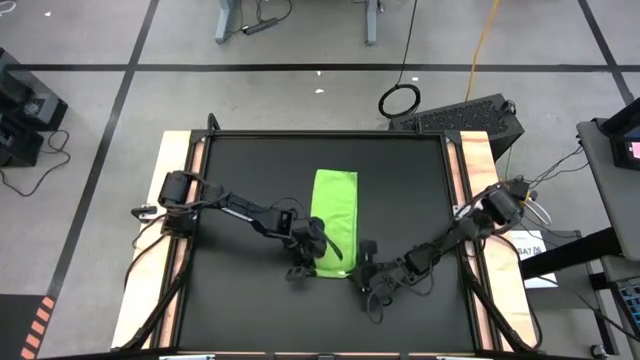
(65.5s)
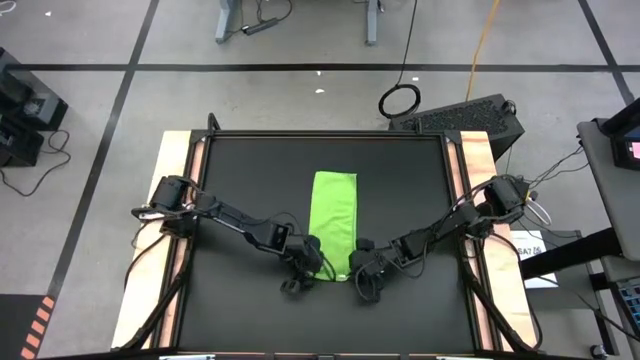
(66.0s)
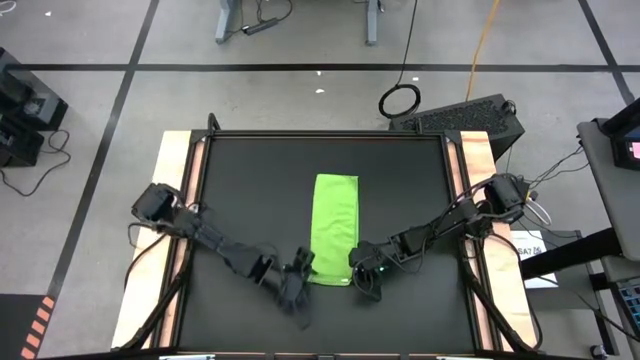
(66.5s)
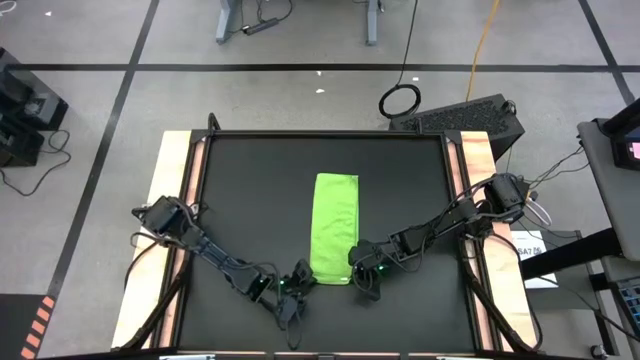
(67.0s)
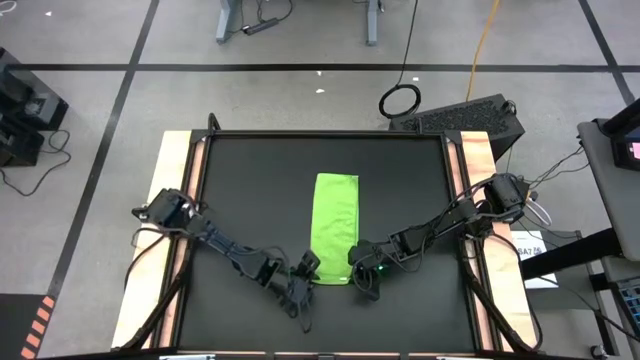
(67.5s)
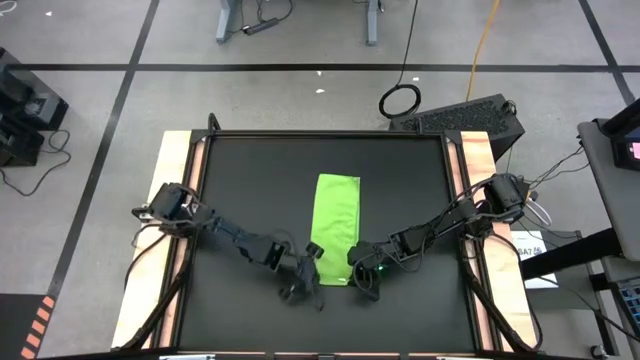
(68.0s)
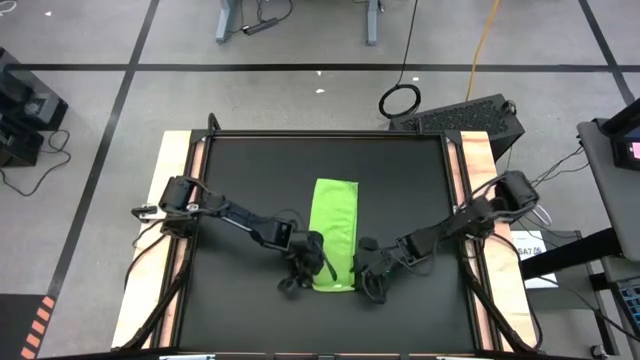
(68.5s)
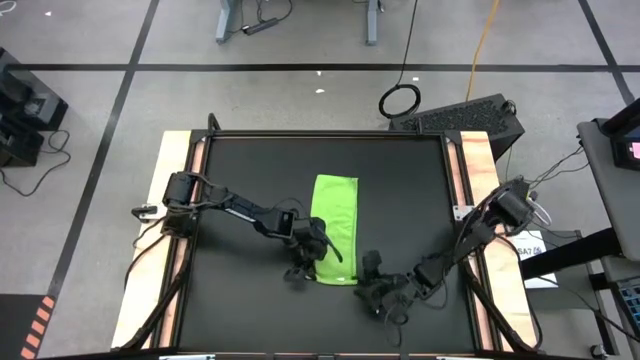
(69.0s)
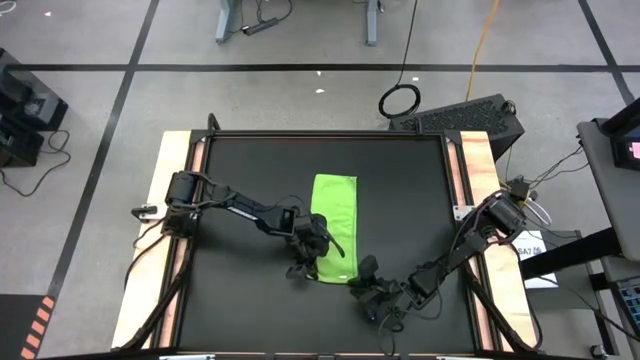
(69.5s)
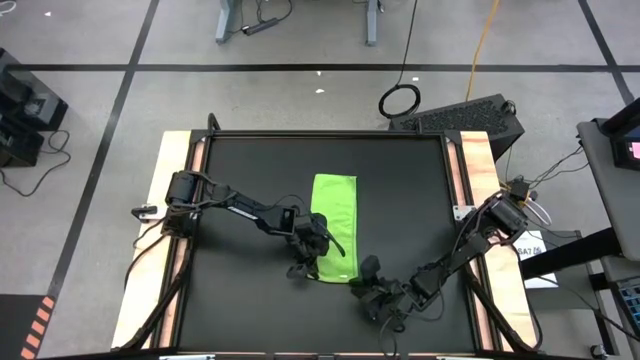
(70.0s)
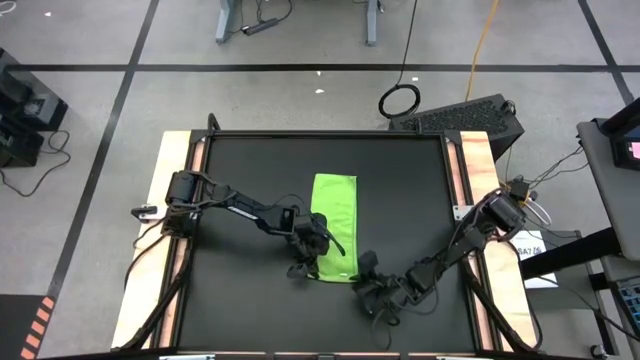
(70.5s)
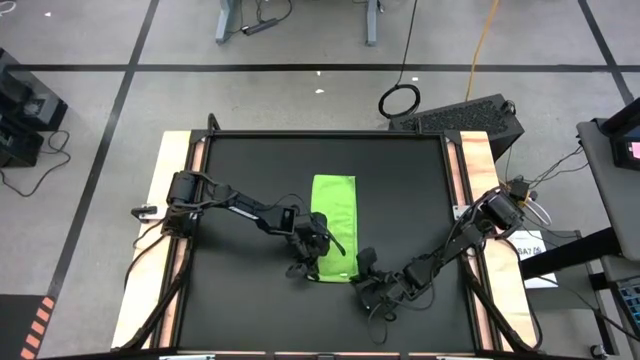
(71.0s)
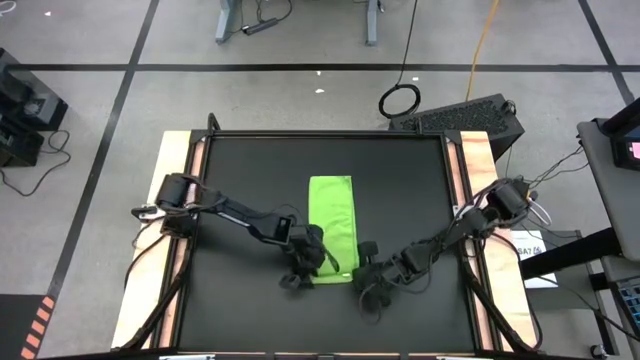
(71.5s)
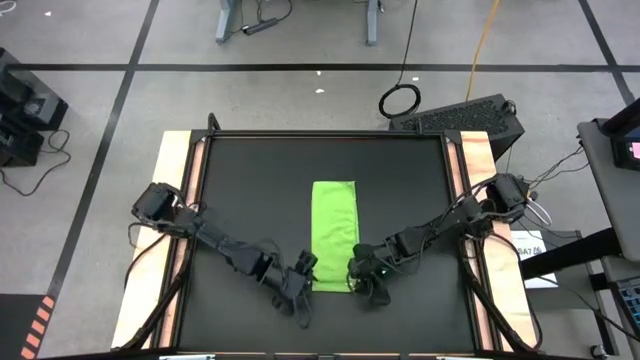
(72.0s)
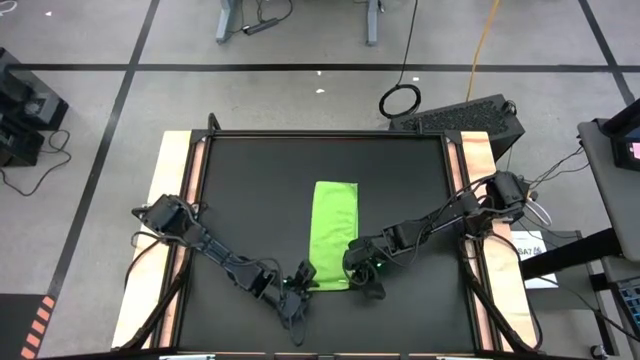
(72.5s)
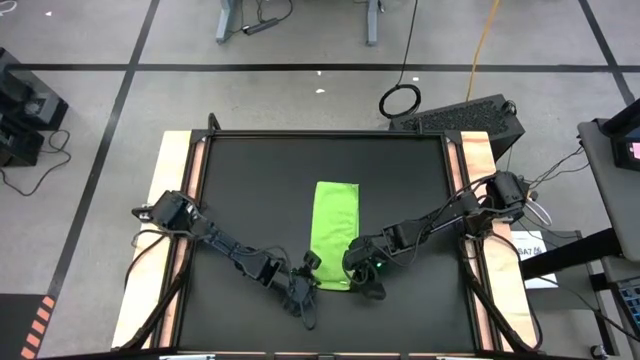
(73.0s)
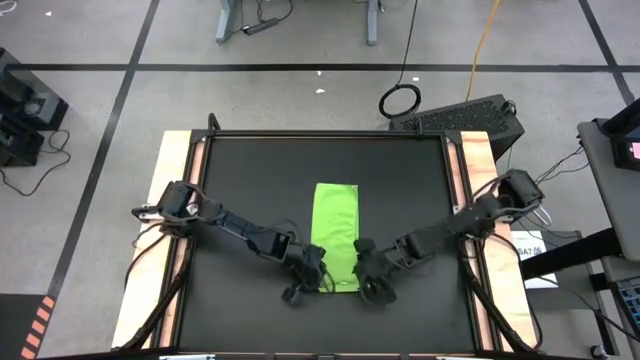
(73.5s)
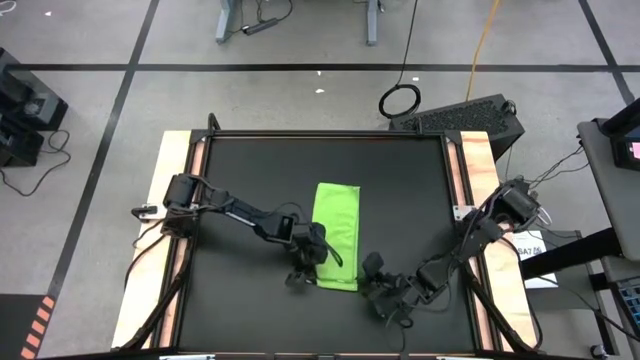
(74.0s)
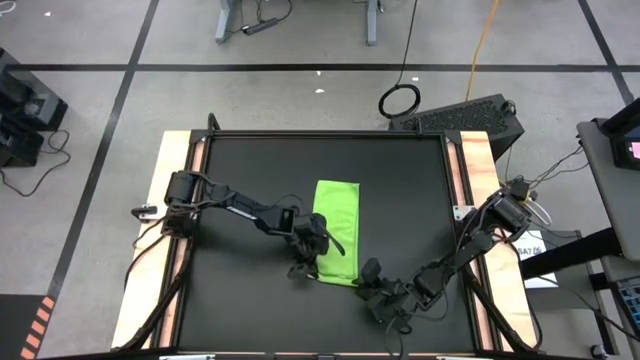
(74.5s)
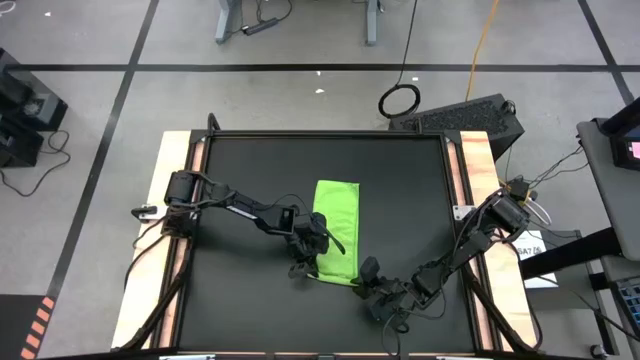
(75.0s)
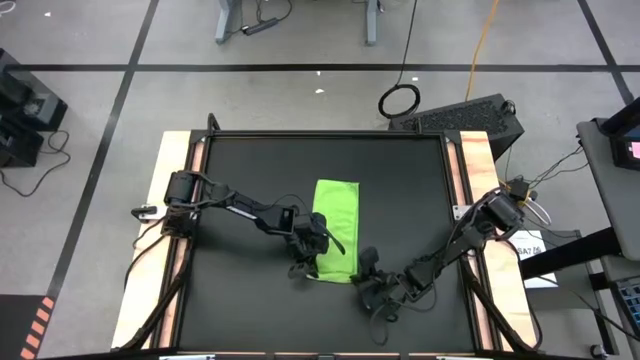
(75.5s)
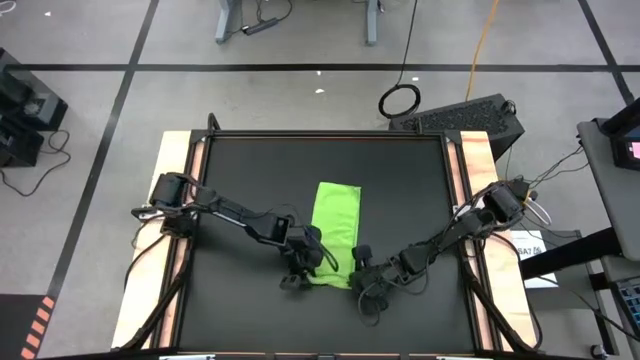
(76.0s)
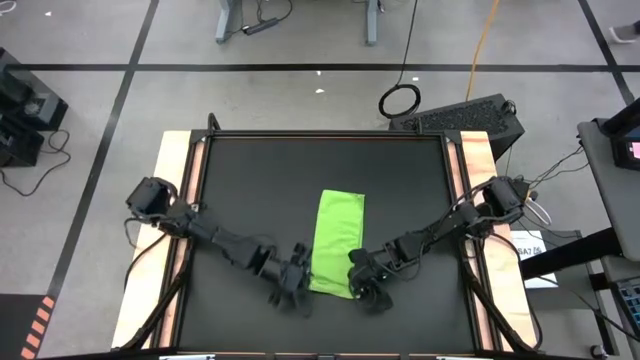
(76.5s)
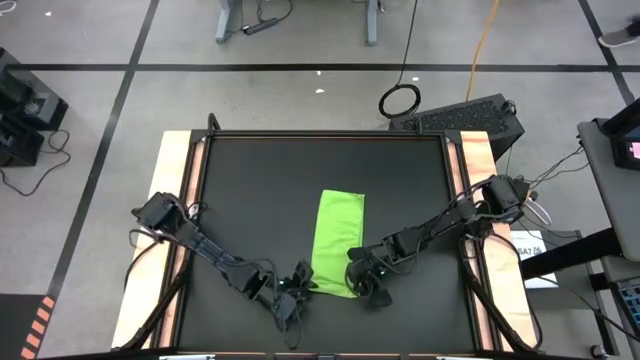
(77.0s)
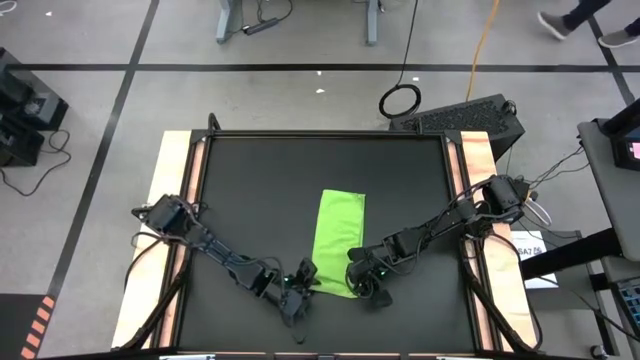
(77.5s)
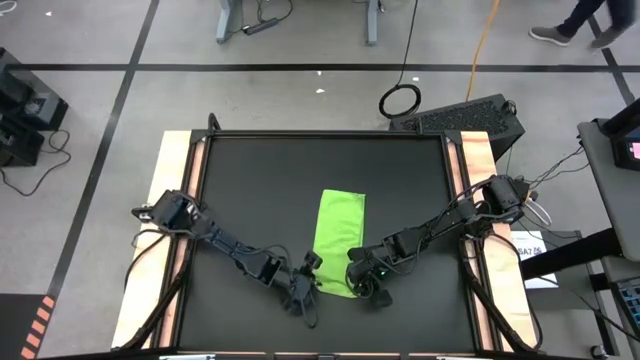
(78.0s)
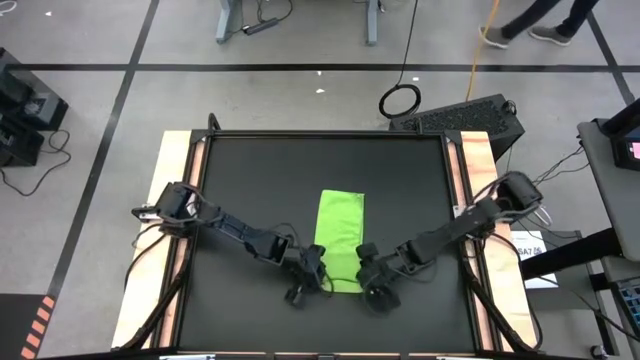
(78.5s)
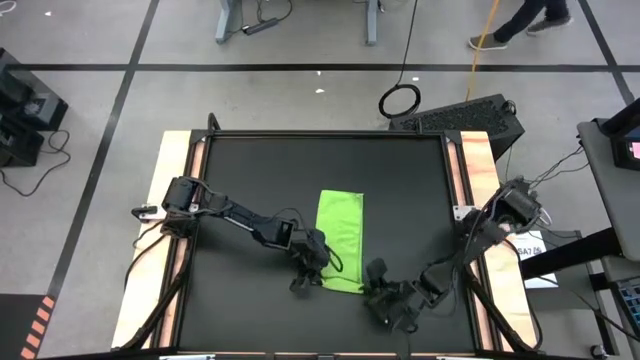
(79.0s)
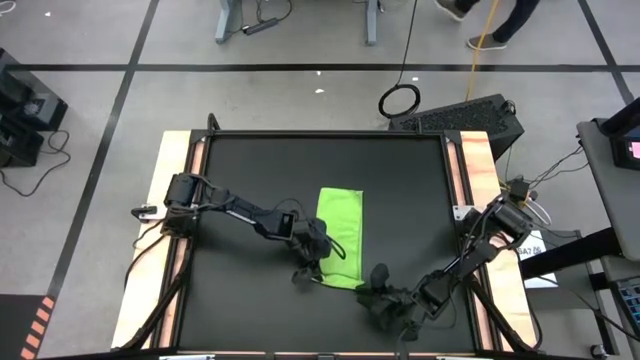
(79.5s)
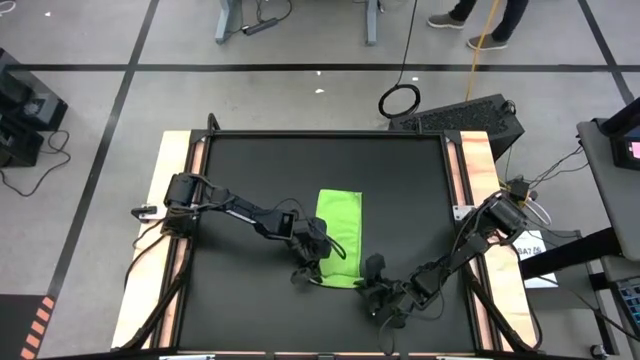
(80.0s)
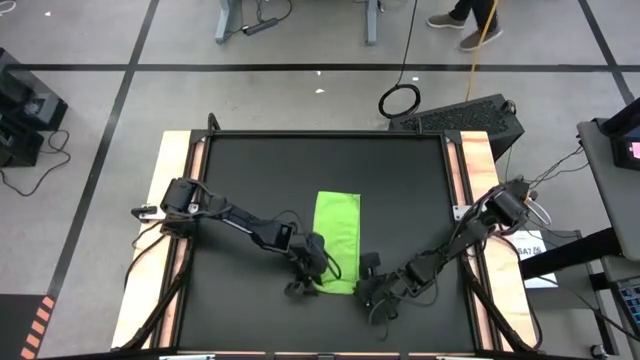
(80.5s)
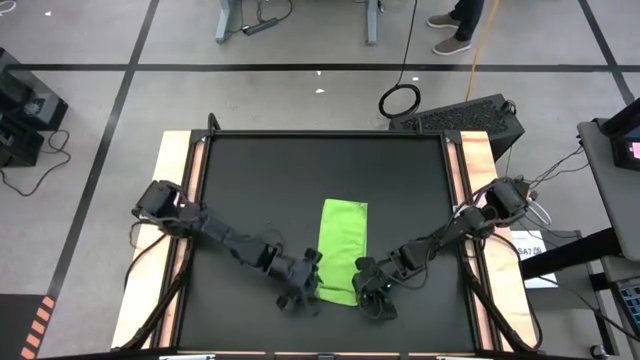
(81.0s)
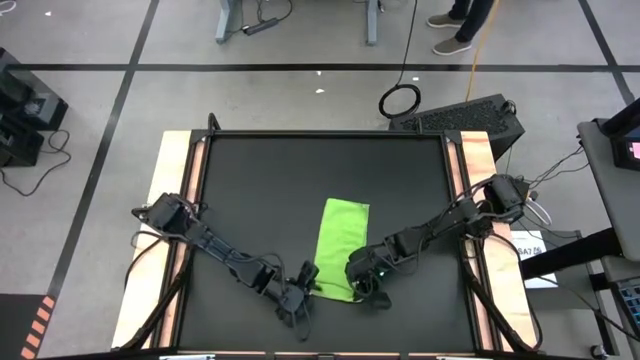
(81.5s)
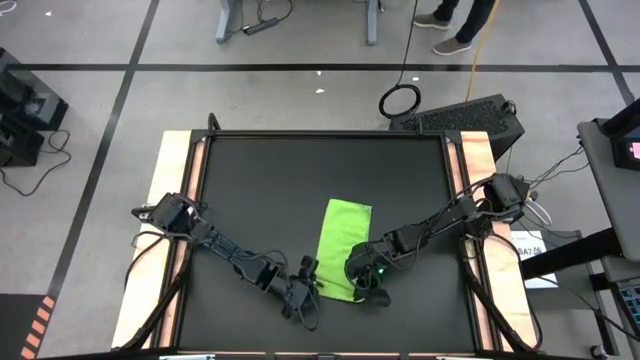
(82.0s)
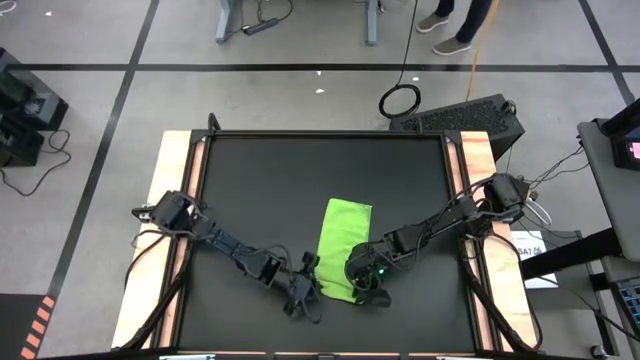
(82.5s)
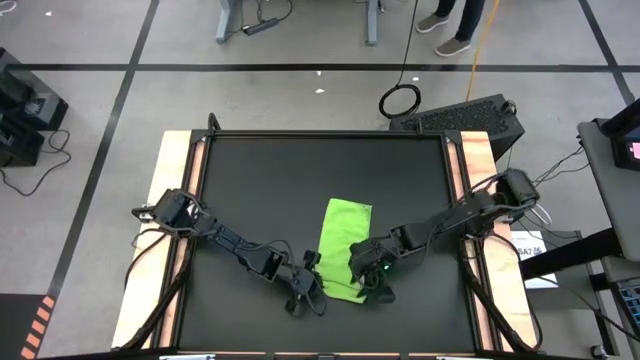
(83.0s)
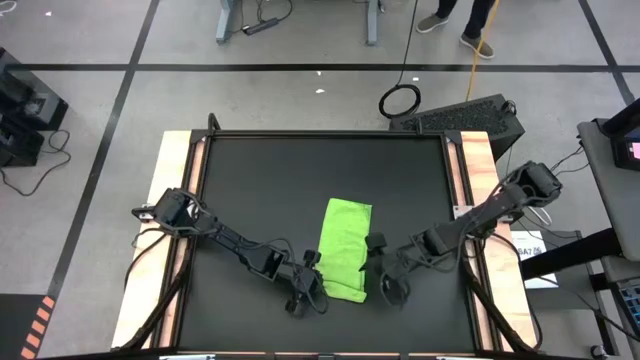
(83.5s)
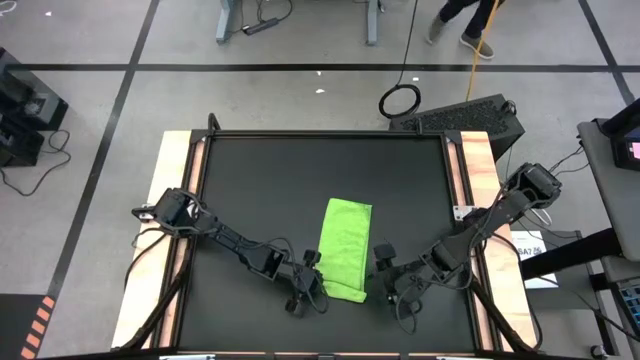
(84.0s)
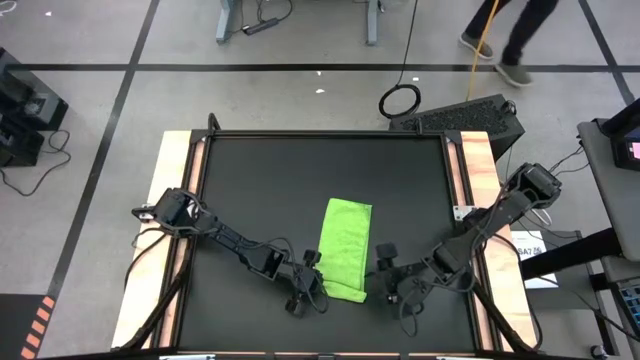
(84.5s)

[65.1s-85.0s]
Task: Roll towel
Roll the green towel on the table

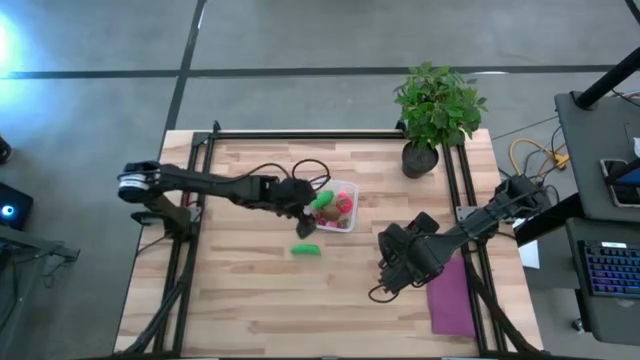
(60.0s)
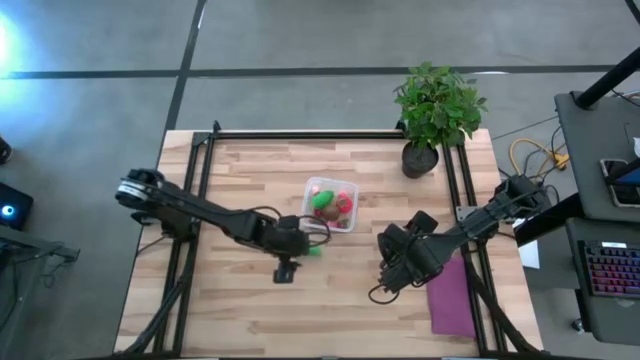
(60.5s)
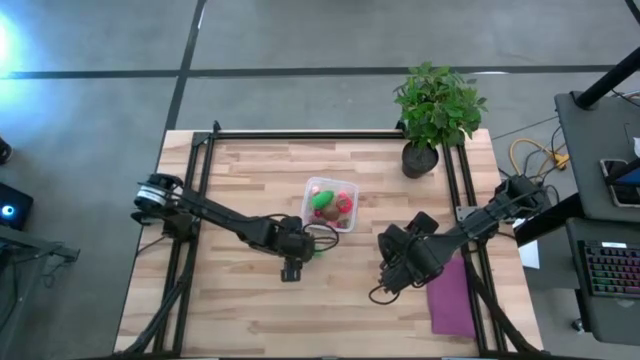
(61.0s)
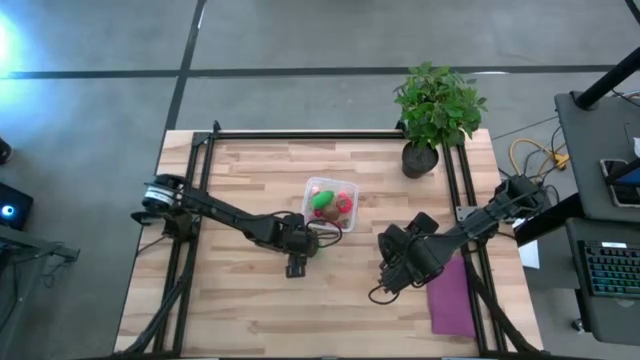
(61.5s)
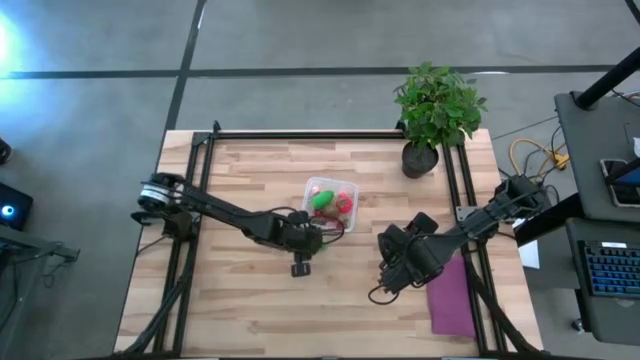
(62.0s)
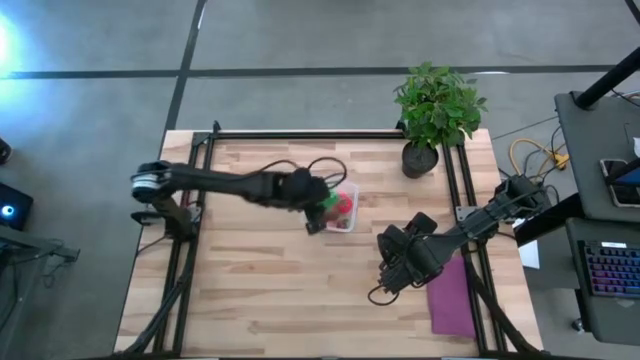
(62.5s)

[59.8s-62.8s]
Task: Pick and placing Produce into tupperware
Put the green peas into the transparent bin
